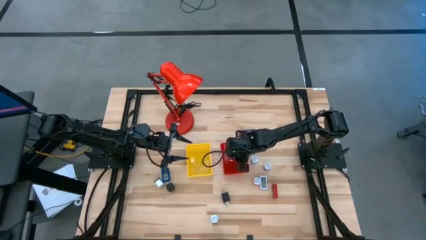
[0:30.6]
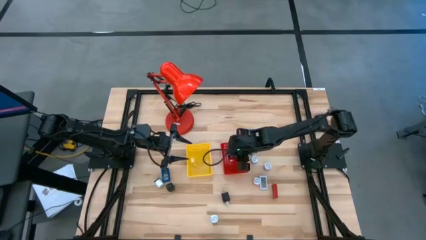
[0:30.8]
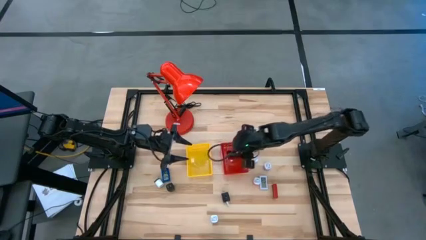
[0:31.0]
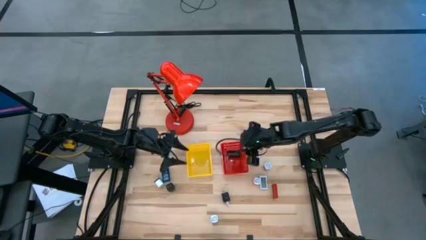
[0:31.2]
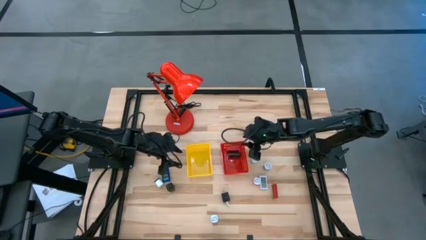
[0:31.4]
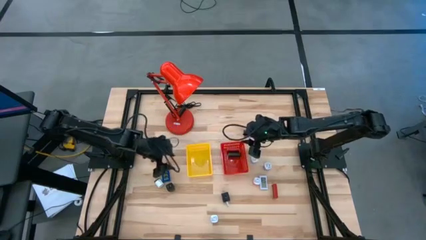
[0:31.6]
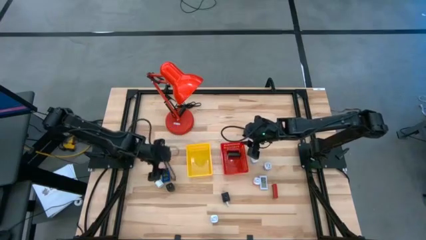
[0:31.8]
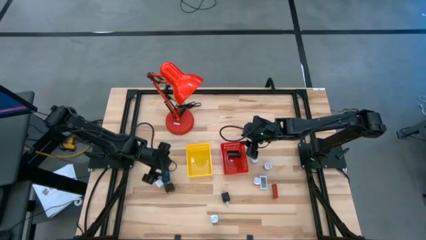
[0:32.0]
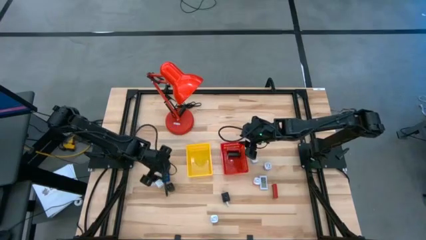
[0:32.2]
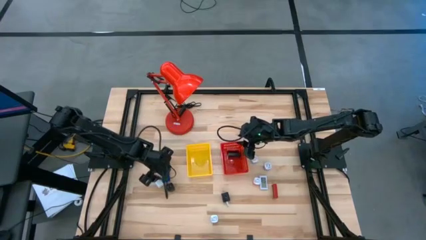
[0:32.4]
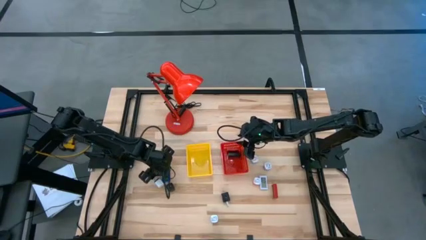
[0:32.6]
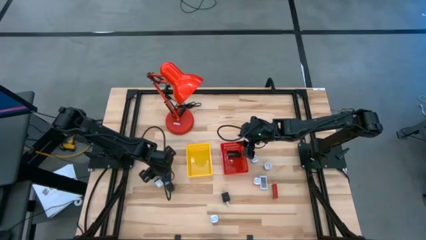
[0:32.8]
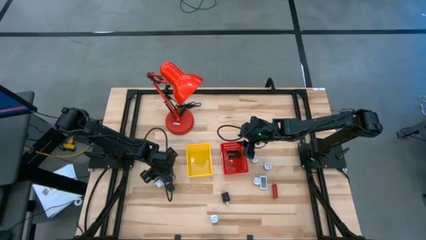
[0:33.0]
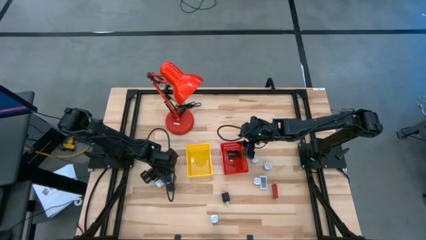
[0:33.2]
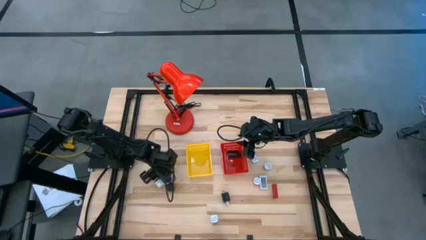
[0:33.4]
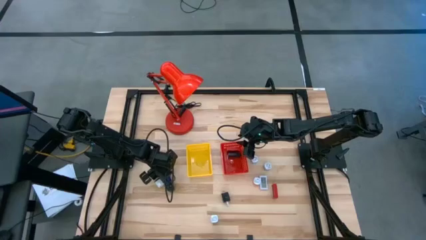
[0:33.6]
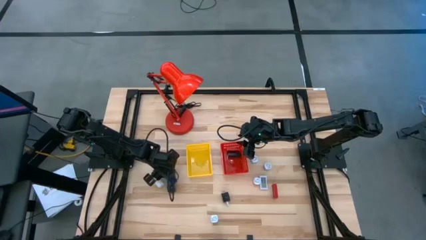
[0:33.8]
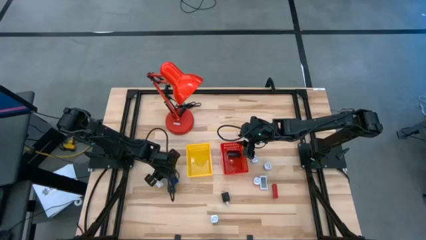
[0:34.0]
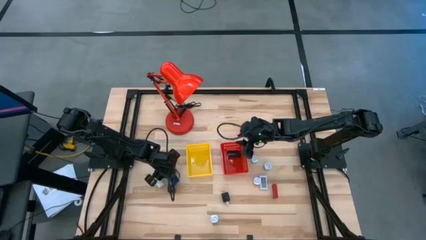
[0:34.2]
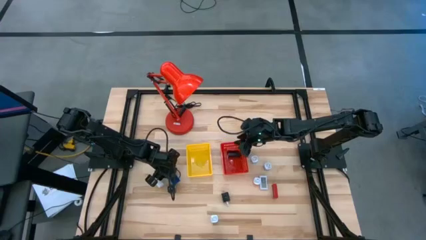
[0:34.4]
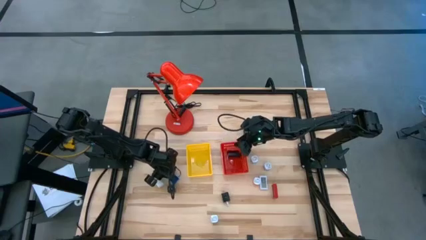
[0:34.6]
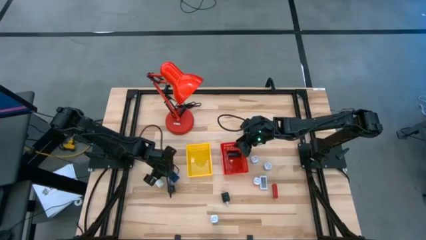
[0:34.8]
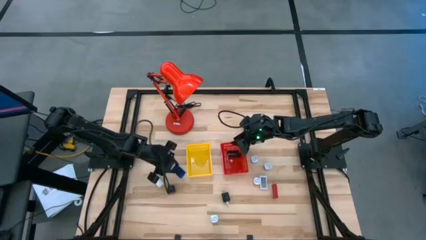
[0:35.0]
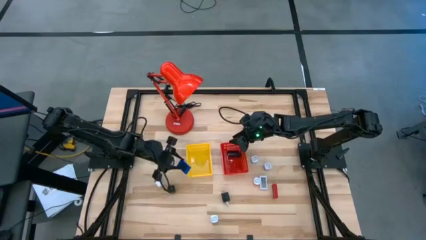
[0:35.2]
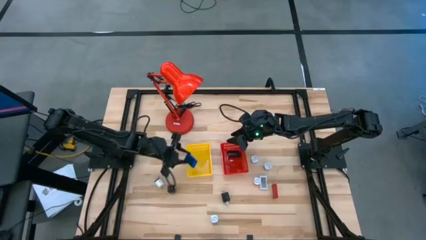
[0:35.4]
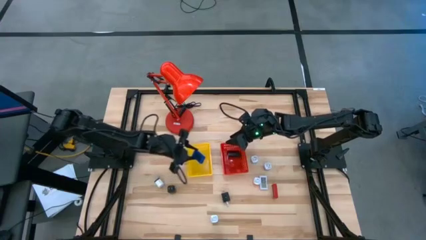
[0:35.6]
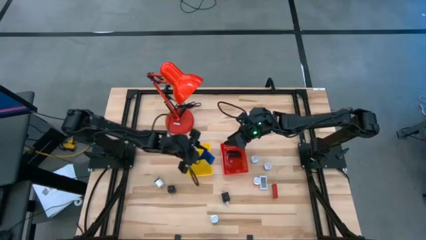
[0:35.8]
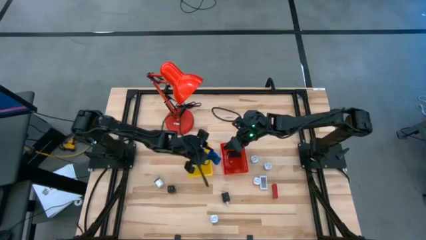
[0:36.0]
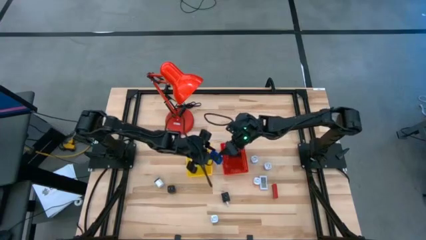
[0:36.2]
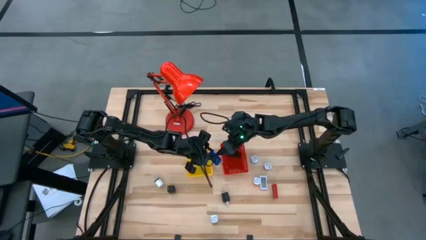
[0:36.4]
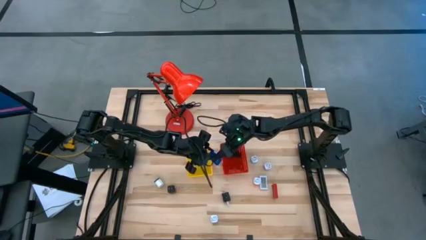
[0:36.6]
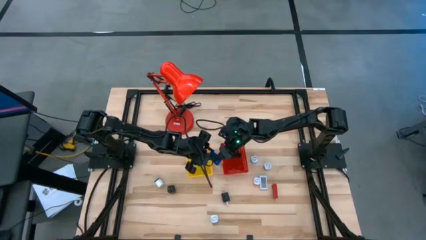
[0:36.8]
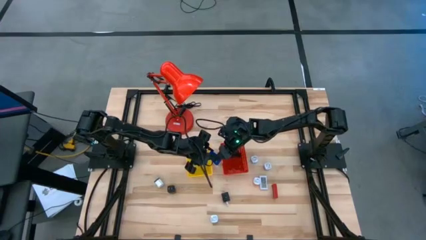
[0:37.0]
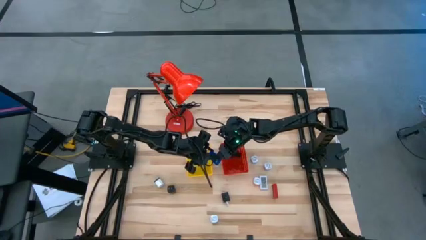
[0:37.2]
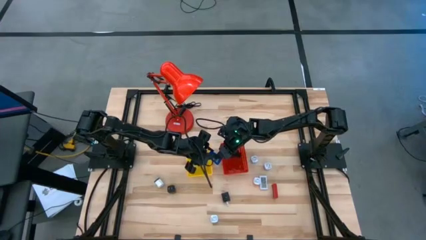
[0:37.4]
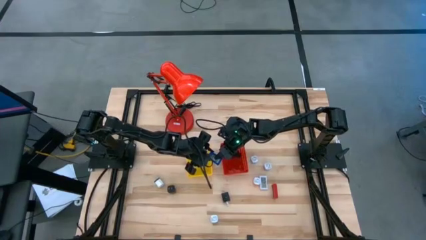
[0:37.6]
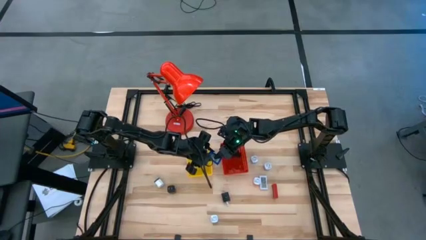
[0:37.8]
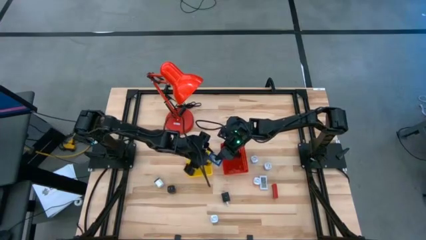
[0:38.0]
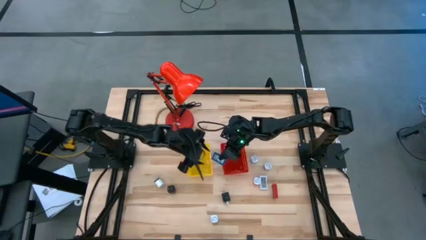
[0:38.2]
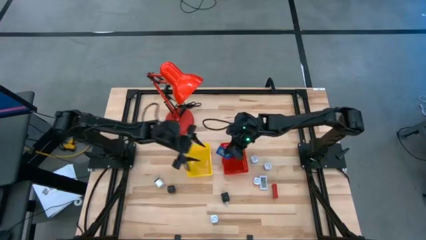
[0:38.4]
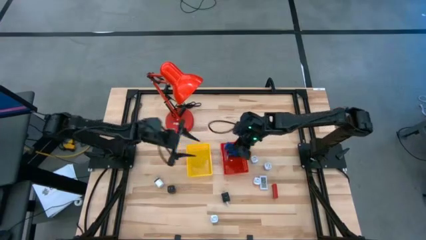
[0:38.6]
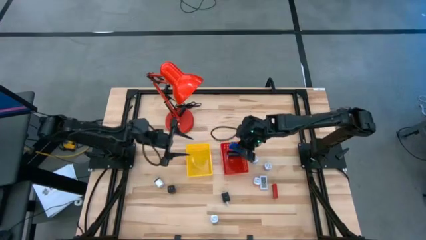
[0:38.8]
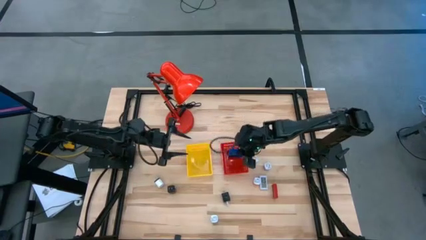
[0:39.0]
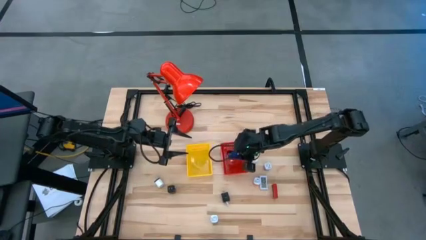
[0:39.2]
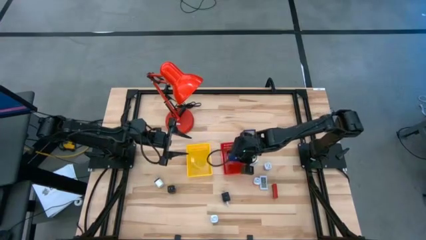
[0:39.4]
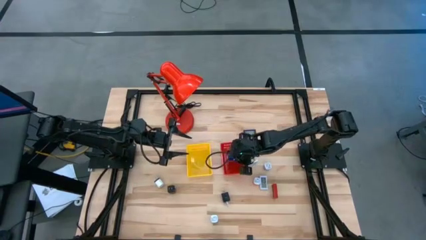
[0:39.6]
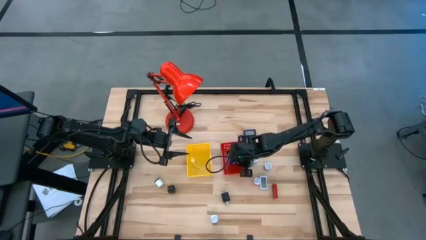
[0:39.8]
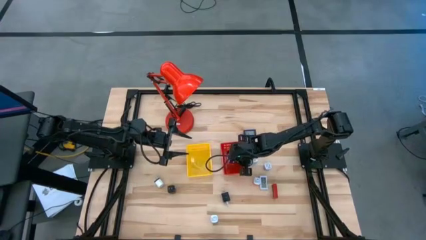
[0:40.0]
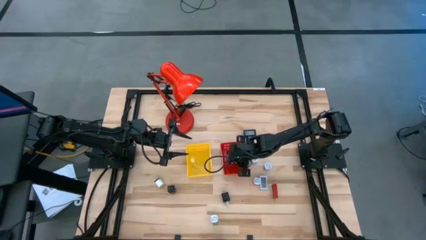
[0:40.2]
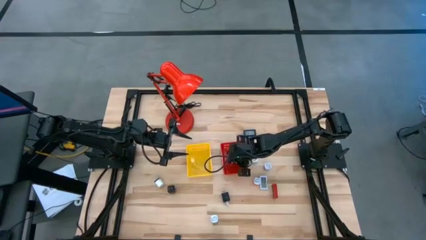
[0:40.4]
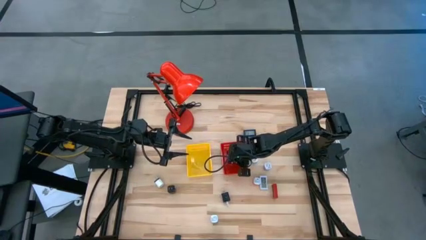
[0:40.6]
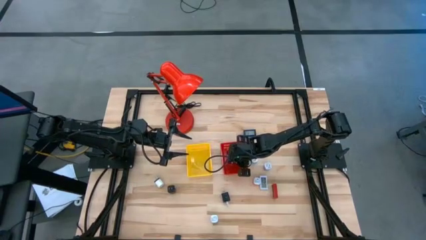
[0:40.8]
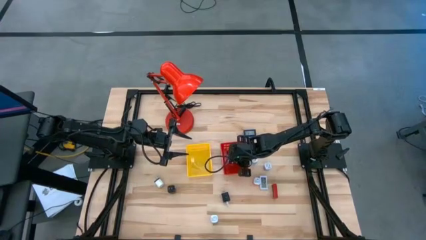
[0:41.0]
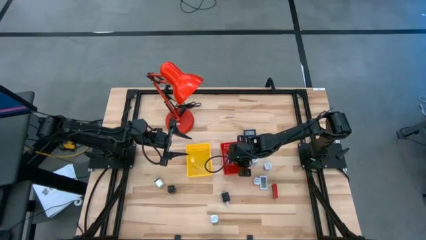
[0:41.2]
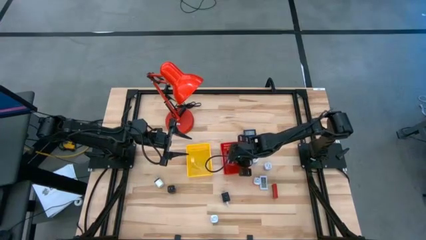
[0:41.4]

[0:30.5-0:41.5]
Task: Pick & Place Office items
Put the blue digital timer into the red bin

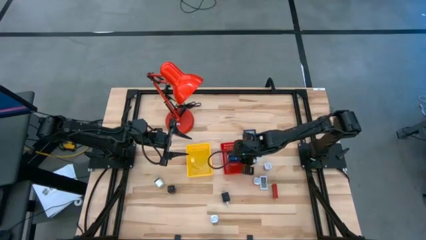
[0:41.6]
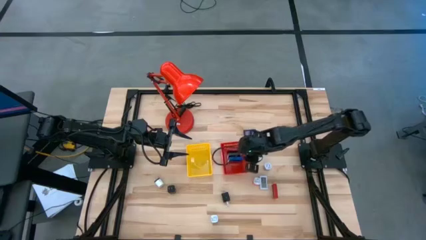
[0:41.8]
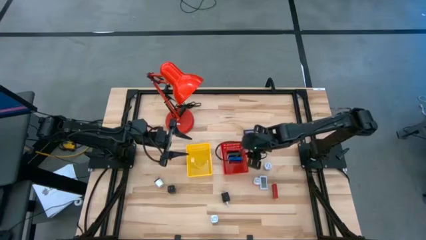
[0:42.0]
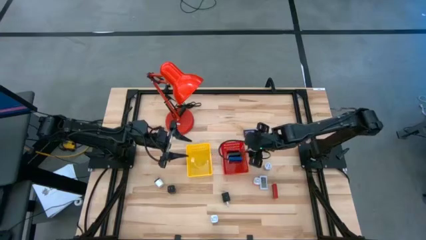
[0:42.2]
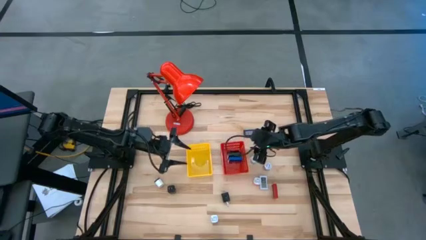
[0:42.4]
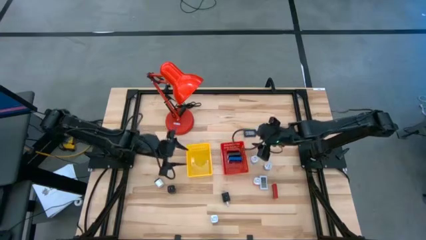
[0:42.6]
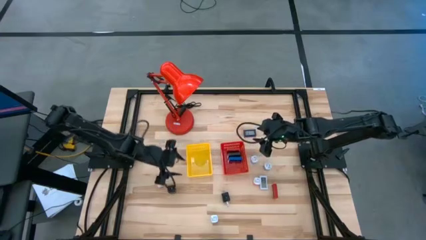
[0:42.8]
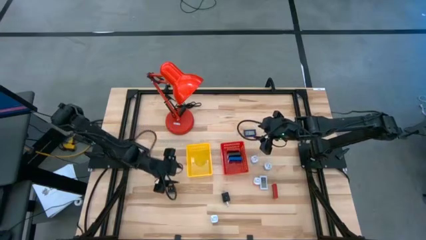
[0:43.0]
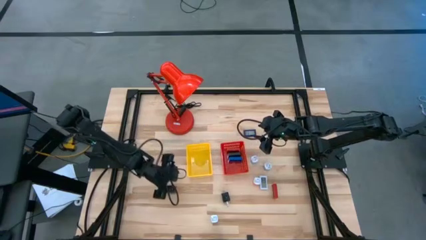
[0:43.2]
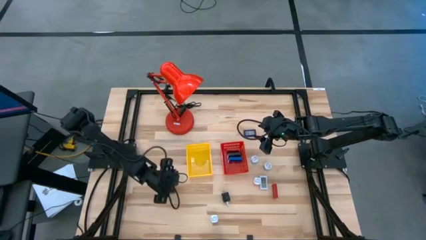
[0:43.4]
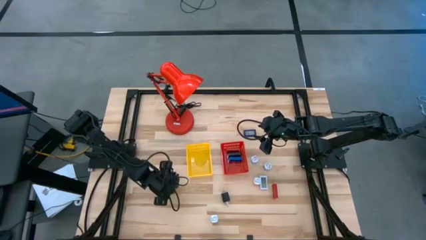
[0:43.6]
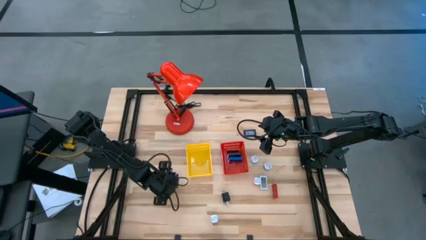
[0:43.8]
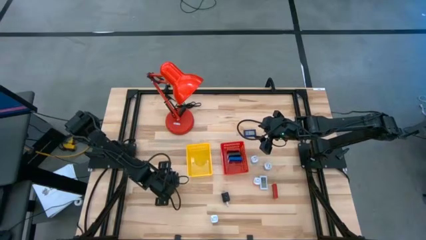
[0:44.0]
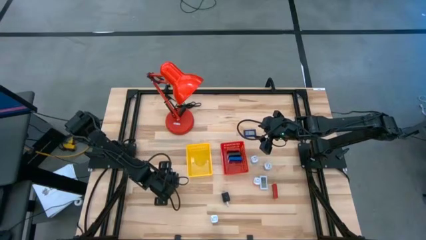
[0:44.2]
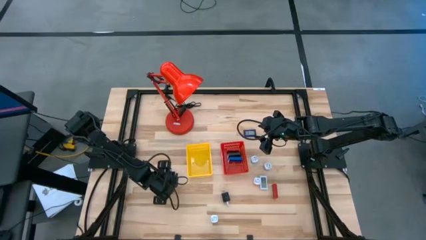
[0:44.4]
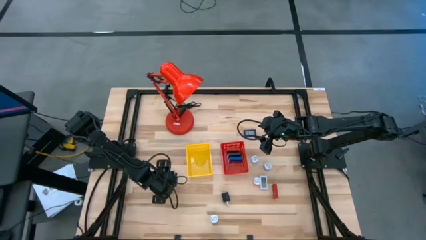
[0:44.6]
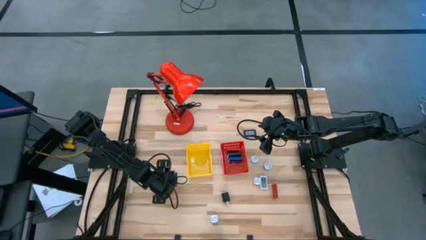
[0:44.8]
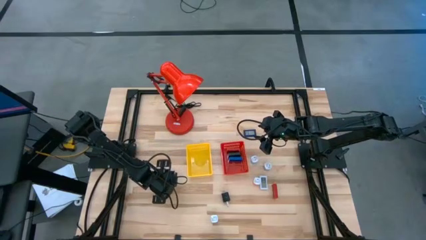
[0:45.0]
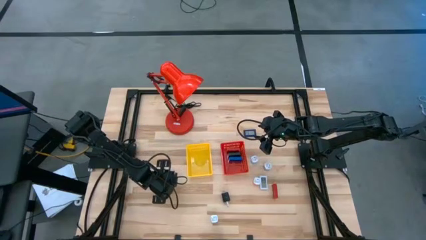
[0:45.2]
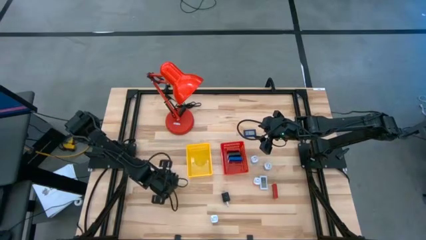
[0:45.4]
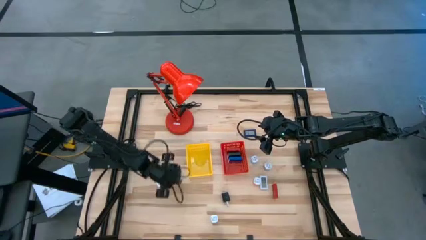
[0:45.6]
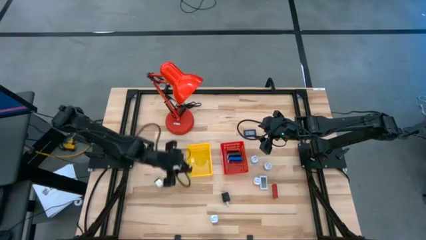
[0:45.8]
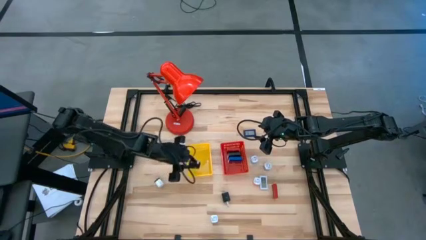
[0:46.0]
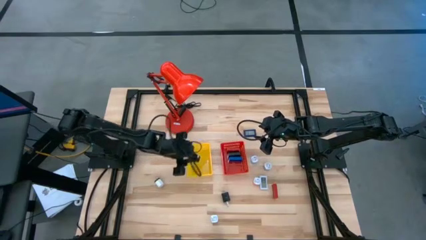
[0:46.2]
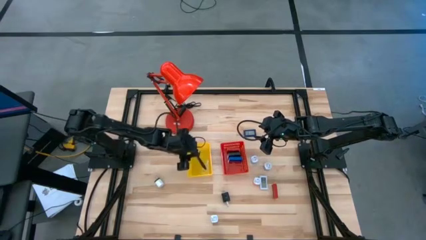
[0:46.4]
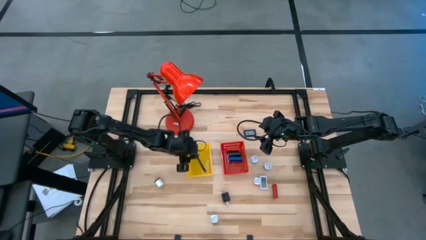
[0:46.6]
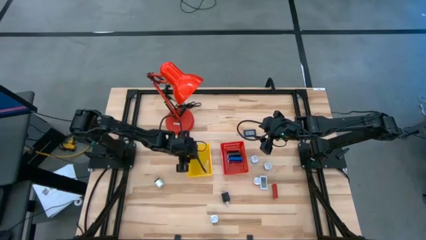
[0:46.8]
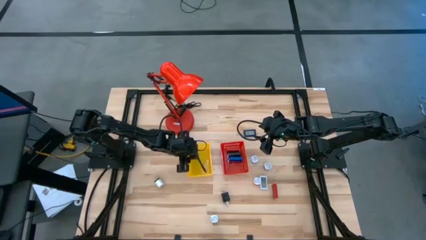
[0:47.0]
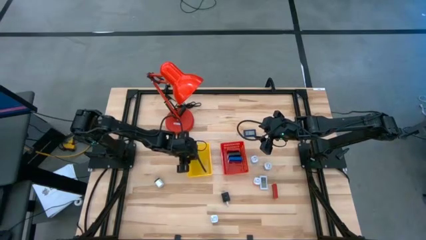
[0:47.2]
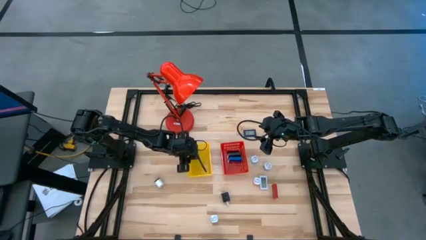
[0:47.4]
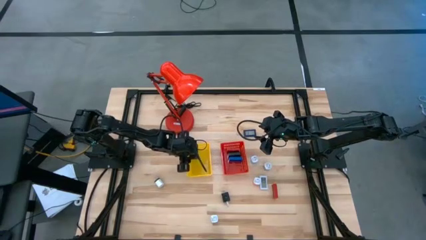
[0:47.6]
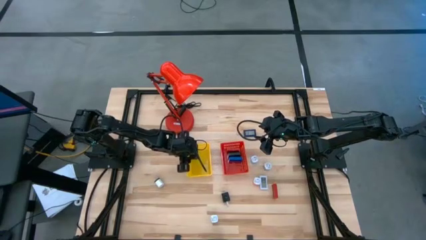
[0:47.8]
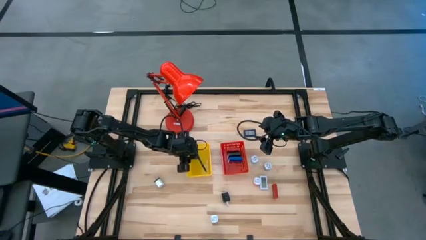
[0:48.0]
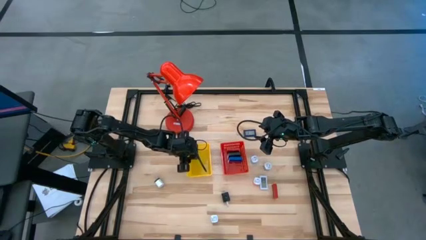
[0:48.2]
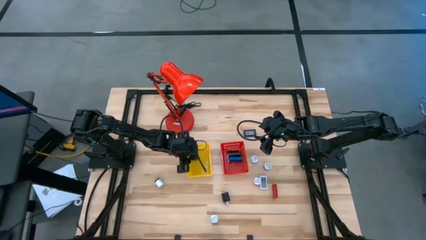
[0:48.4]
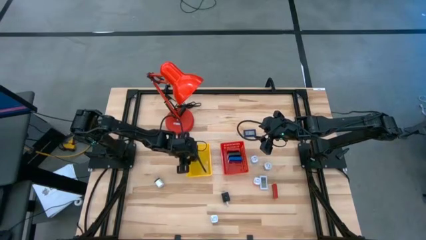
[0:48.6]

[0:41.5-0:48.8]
Put the left black charger adapter into the yellow bin
